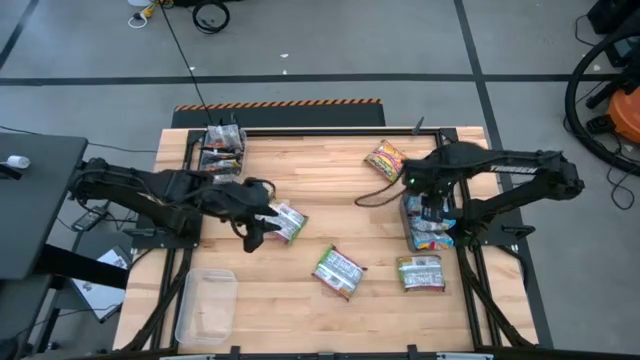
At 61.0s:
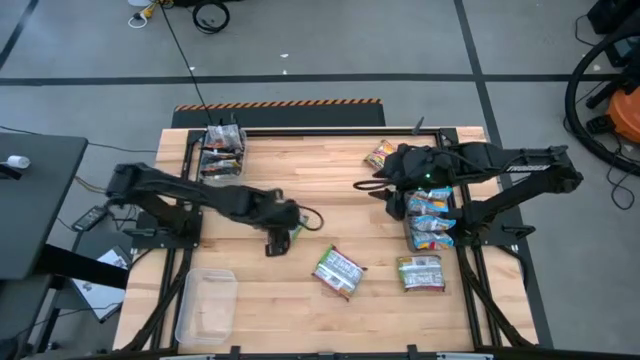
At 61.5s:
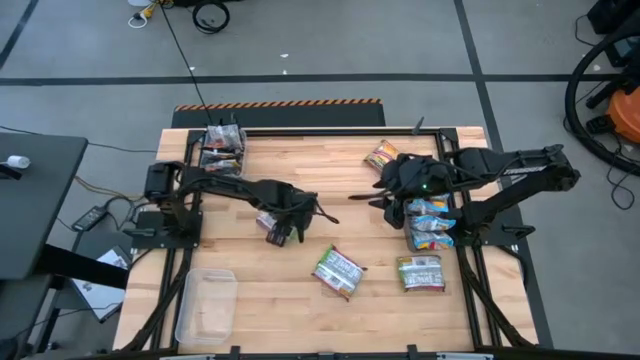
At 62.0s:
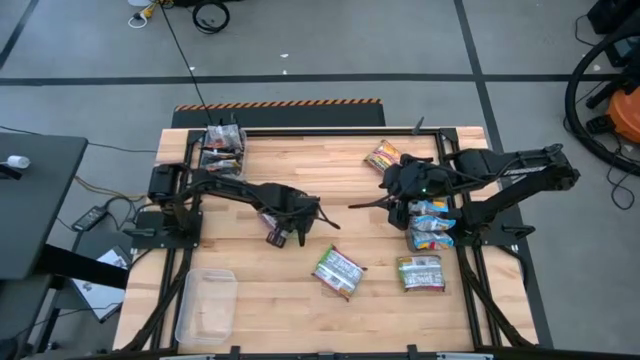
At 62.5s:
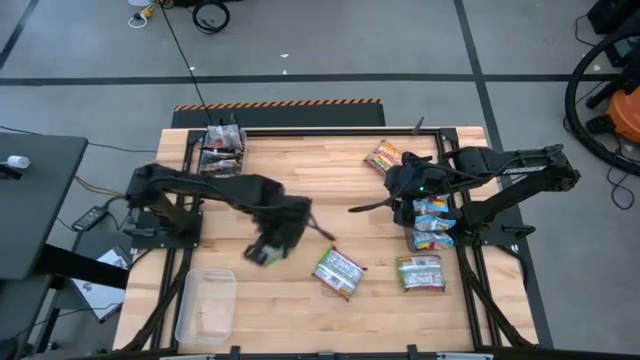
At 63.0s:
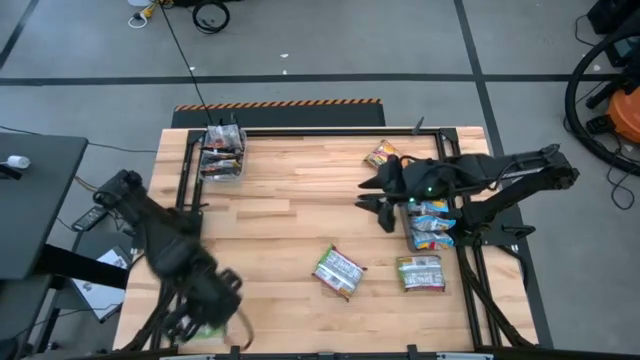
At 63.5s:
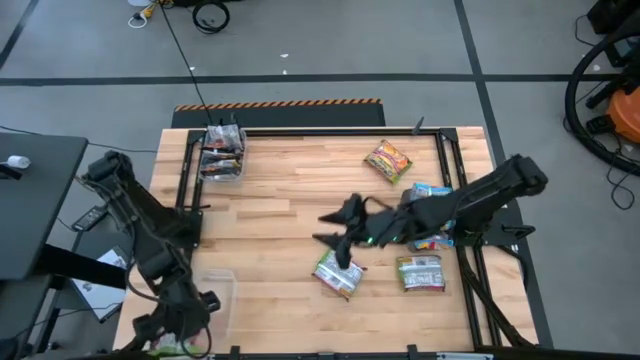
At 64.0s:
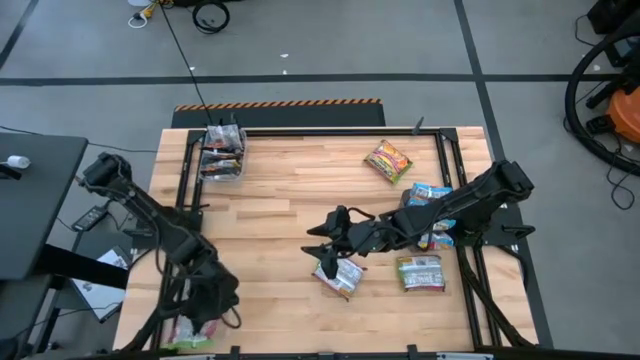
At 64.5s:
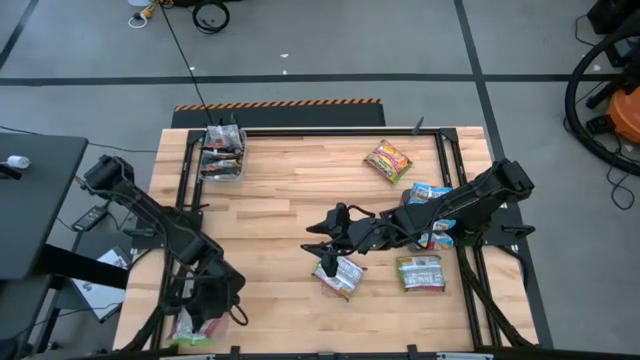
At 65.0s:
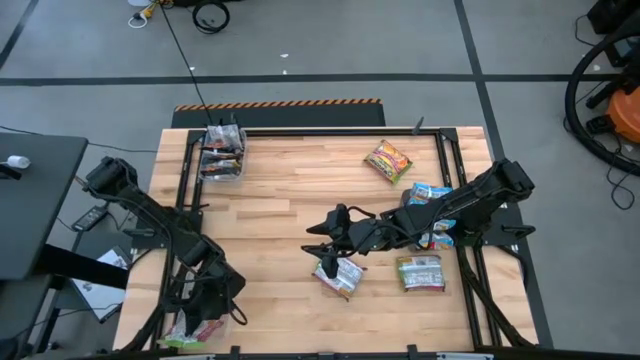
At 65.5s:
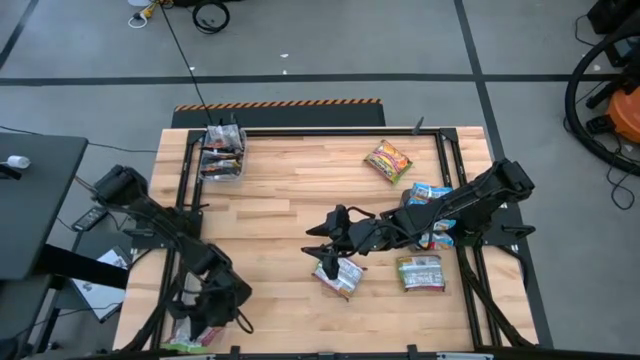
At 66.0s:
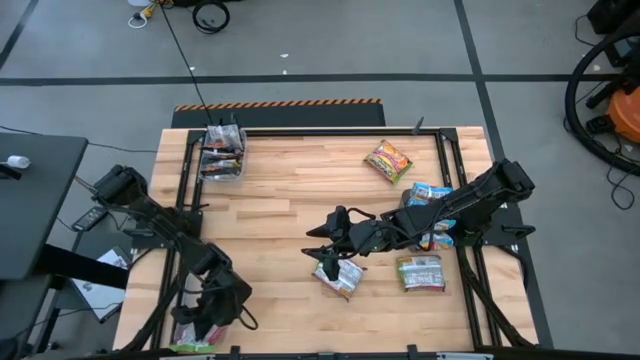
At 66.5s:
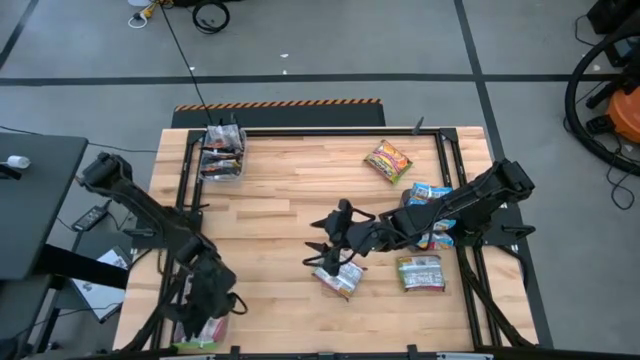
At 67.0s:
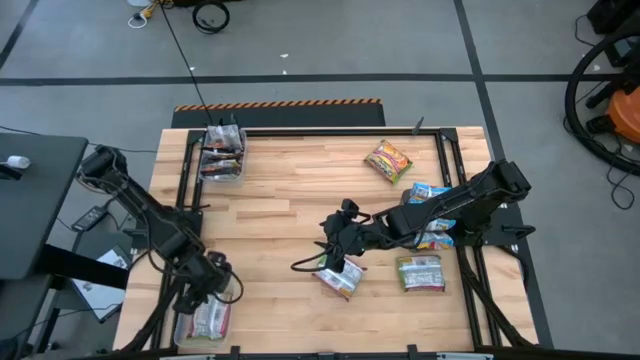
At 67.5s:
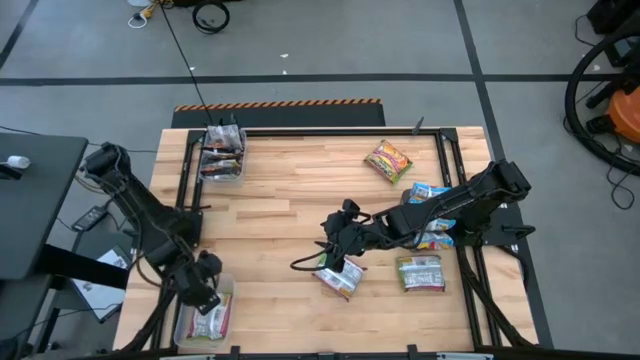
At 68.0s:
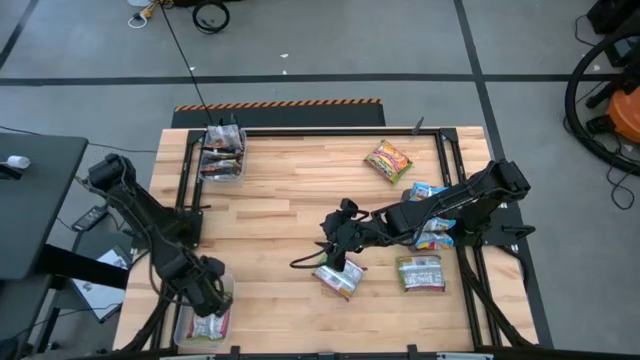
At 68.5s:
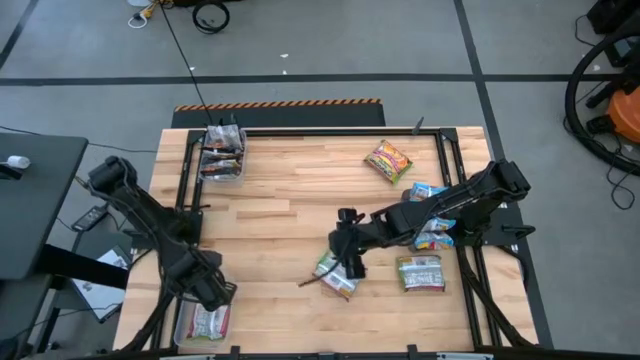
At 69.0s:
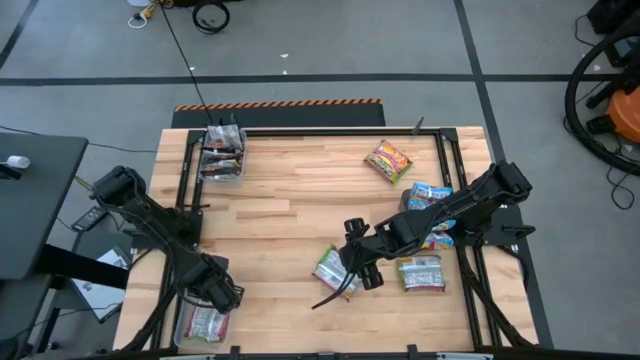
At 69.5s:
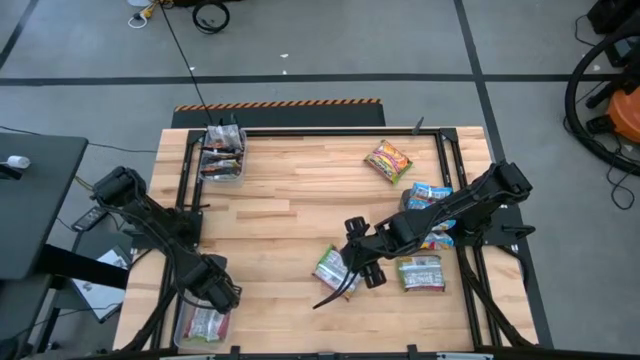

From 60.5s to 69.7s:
Task: Sort Maruchan noodles
Put the green noodle pack into the bottom transparent bin

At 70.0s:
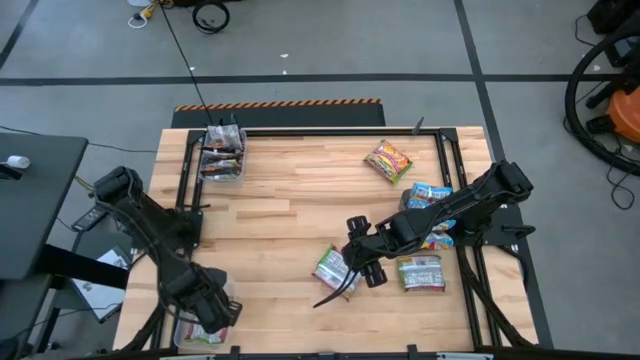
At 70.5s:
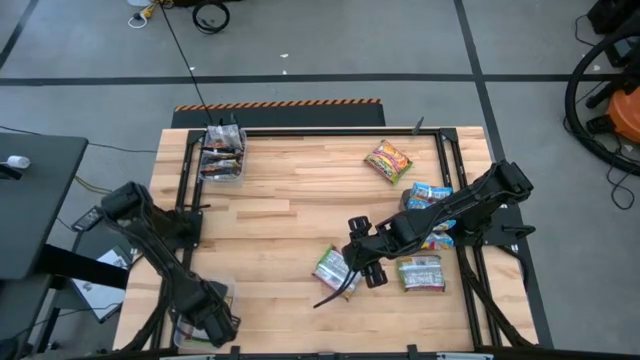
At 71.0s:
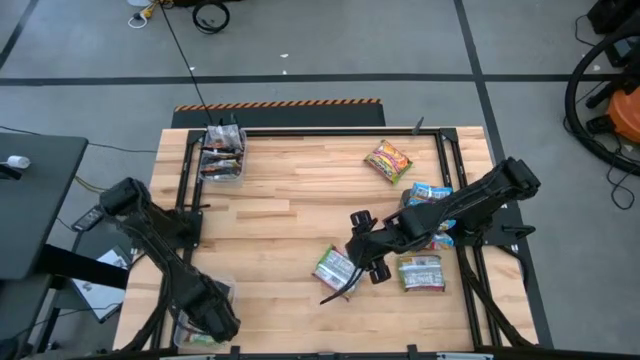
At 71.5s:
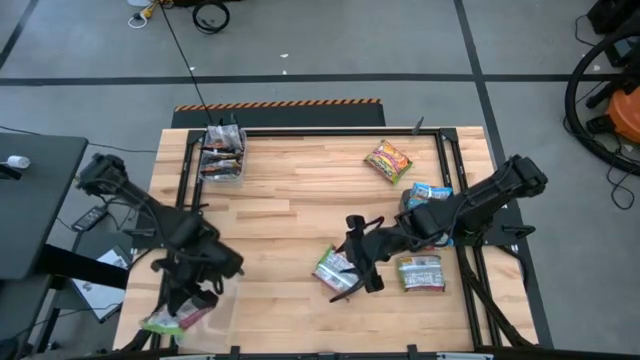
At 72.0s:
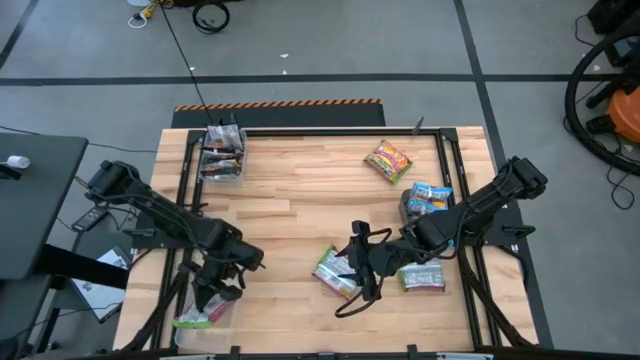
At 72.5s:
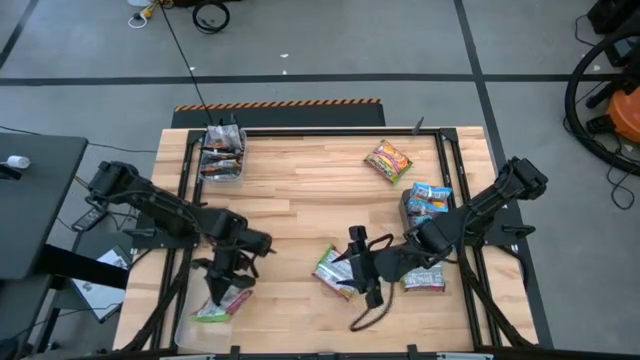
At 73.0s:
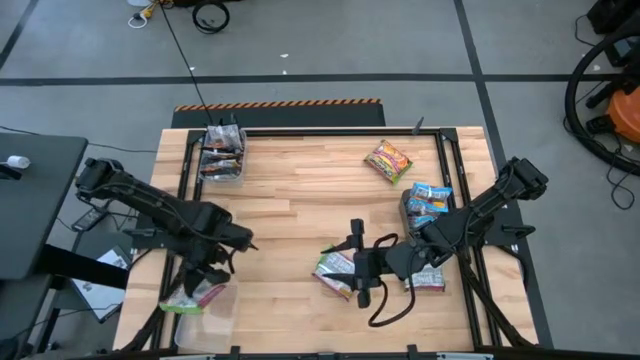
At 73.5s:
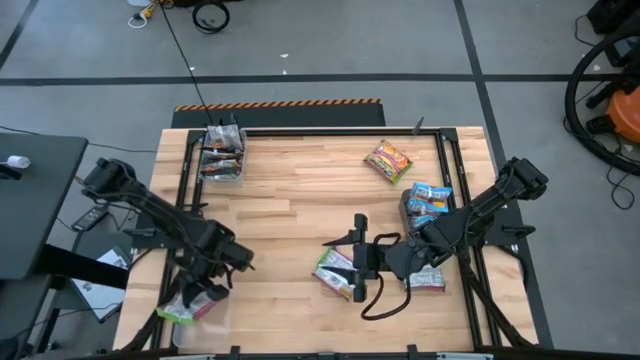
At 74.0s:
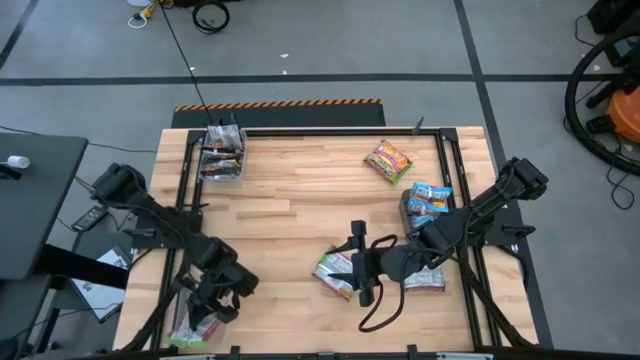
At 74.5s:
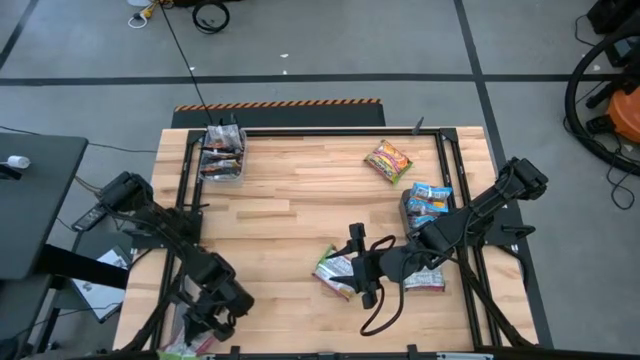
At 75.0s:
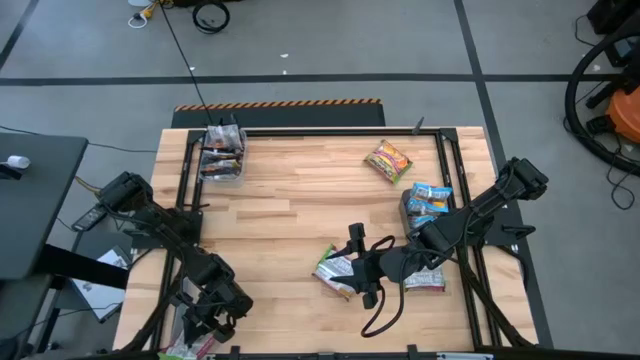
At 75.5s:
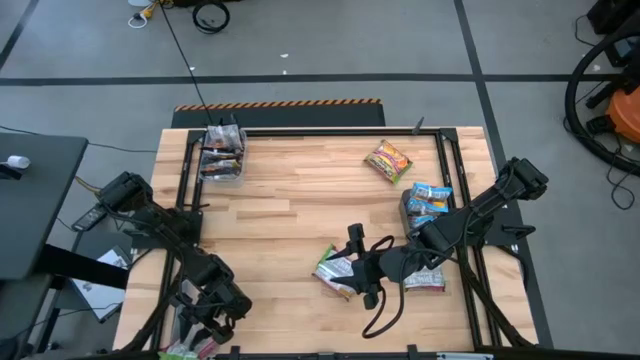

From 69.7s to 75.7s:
Put the green noodle pack into the bottom transparent bin

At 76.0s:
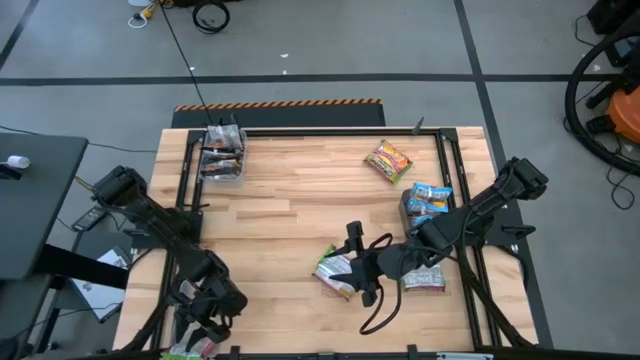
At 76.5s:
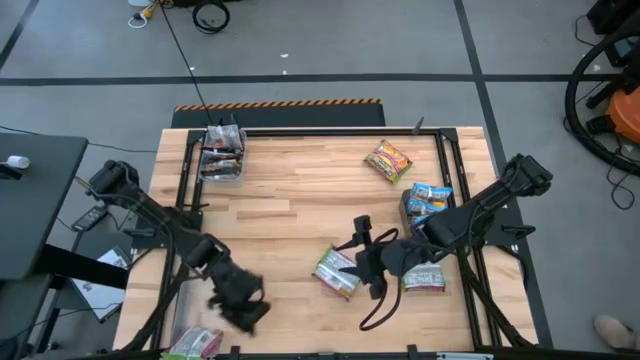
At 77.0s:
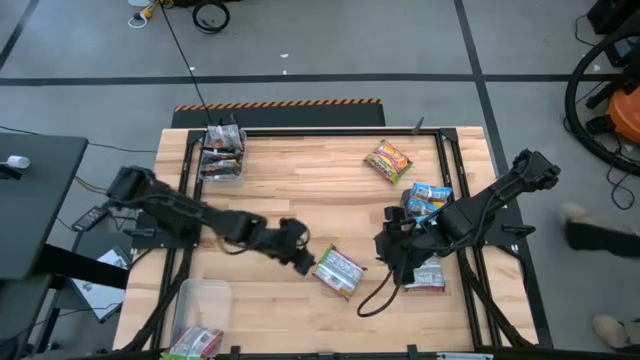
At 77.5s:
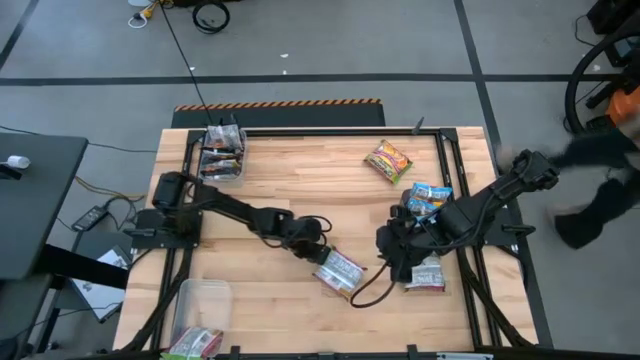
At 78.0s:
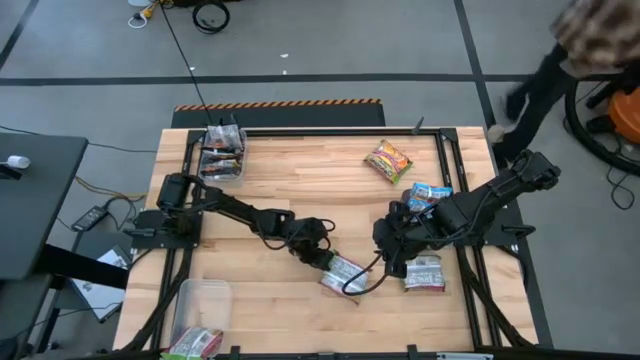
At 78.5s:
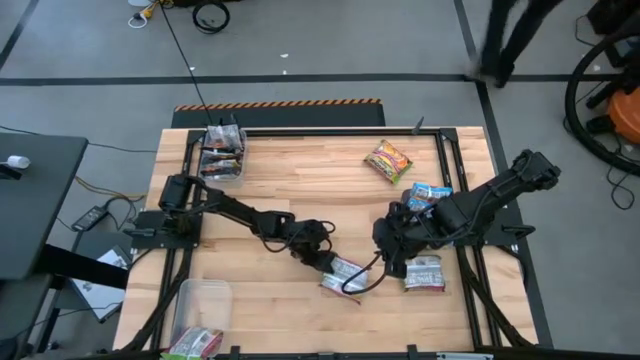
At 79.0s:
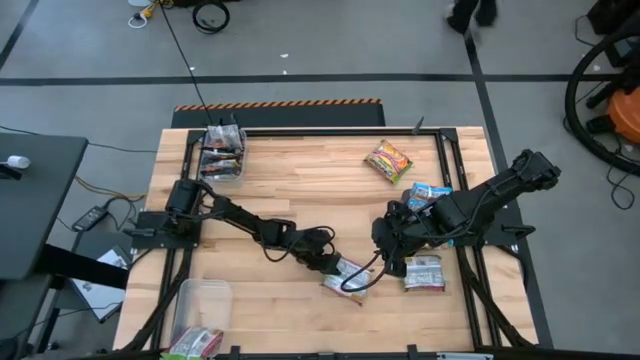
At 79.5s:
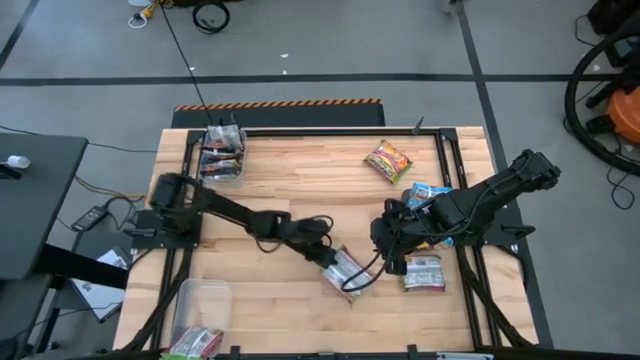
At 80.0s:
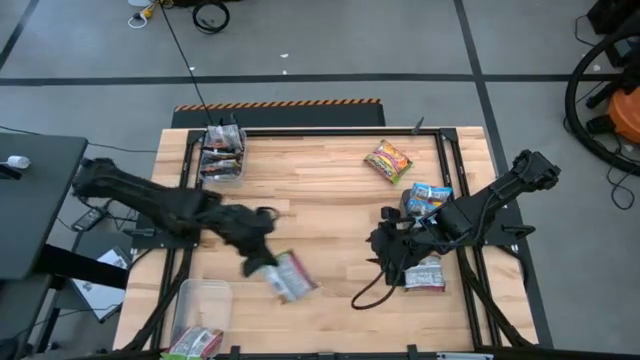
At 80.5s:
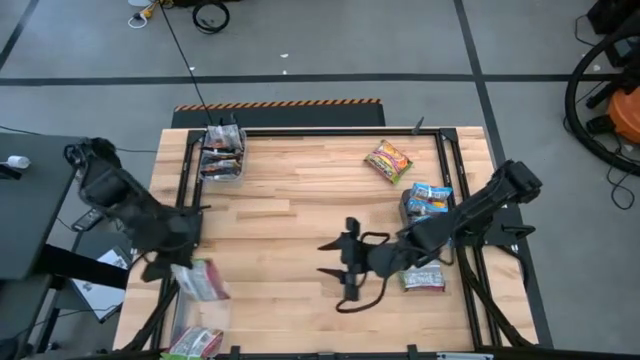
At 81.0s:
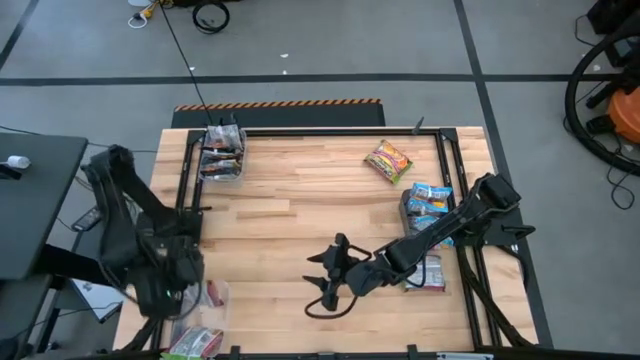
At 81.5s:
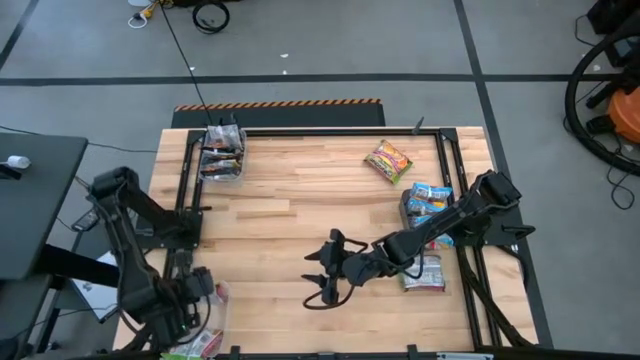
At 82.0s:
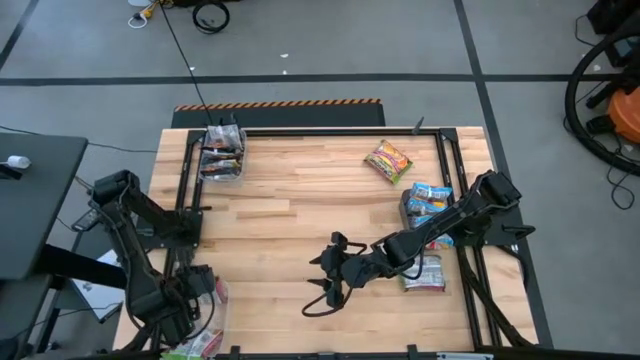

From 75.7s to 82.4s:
Put the green noodle pack into the bottom transparent bin
